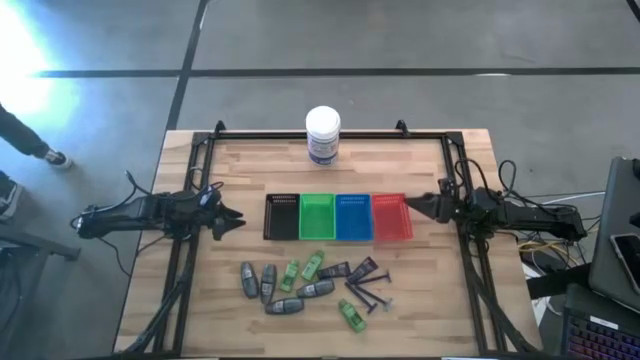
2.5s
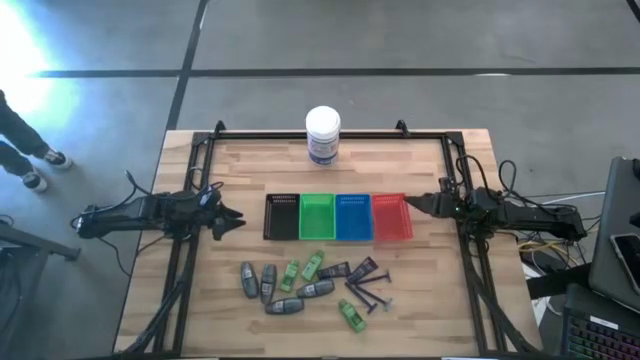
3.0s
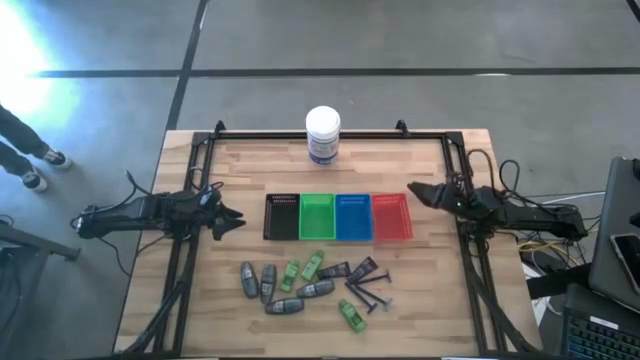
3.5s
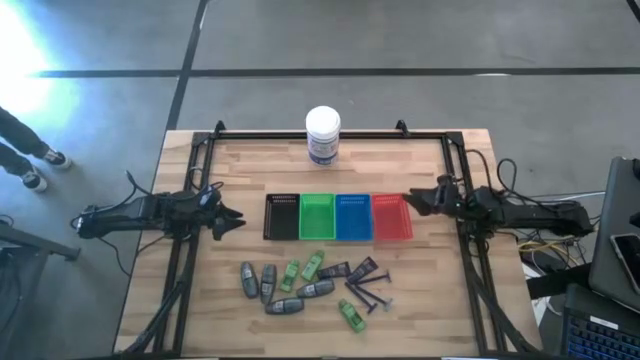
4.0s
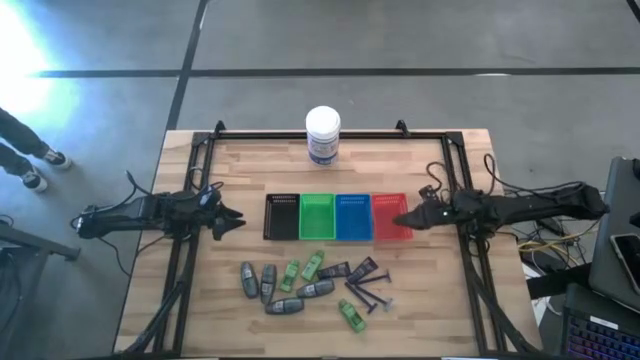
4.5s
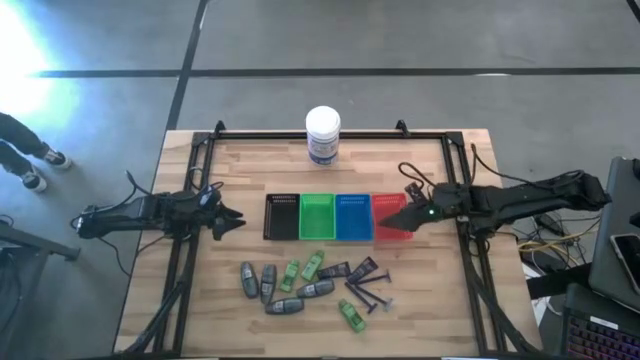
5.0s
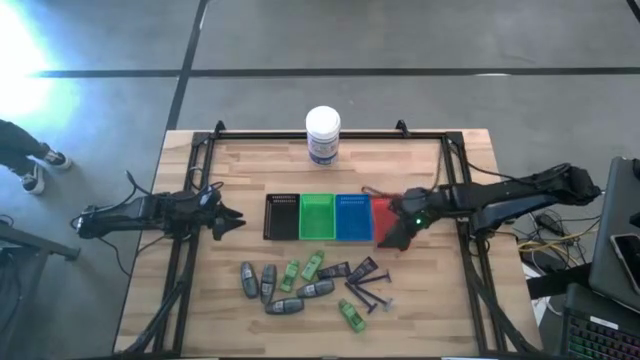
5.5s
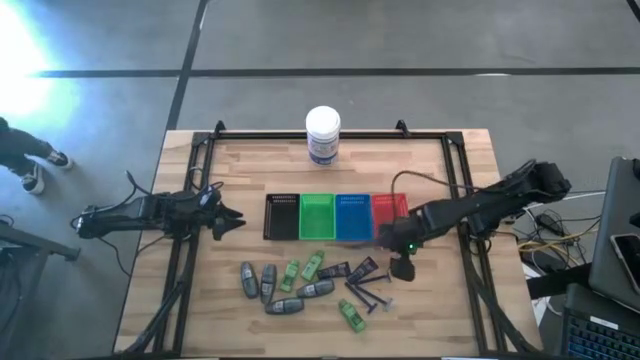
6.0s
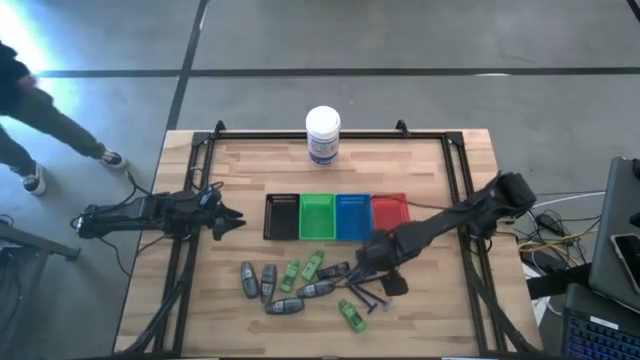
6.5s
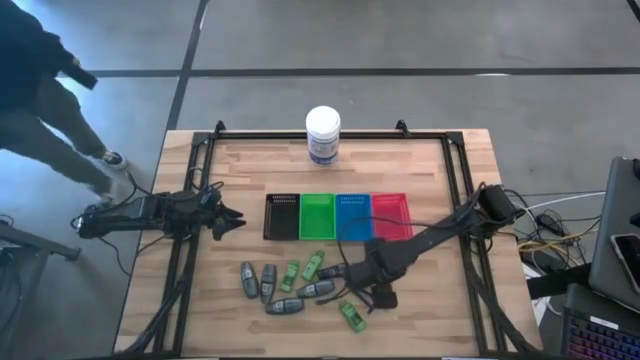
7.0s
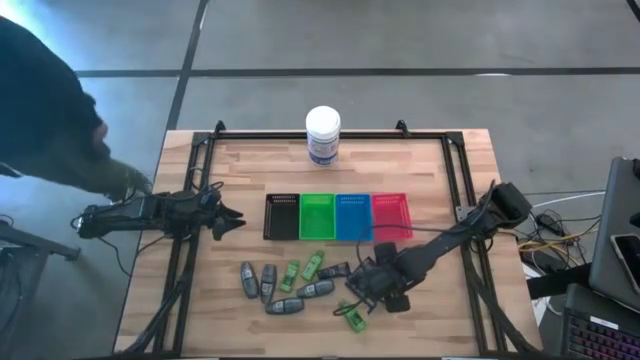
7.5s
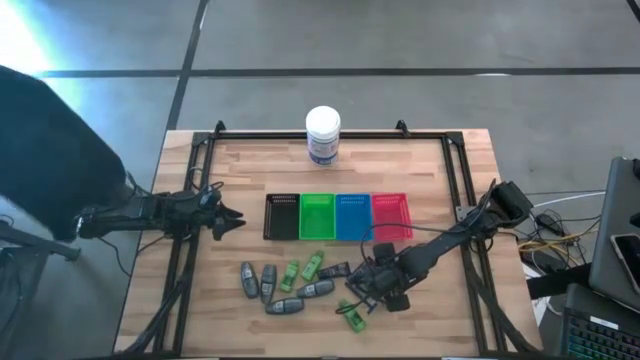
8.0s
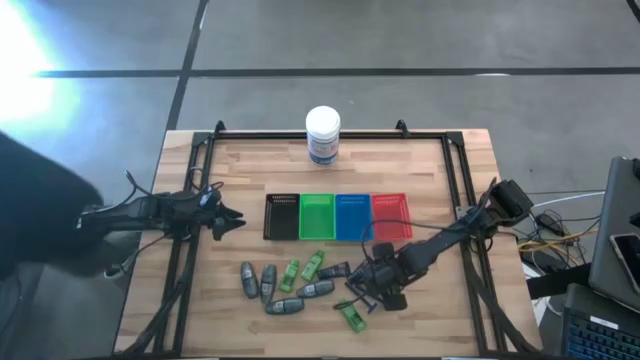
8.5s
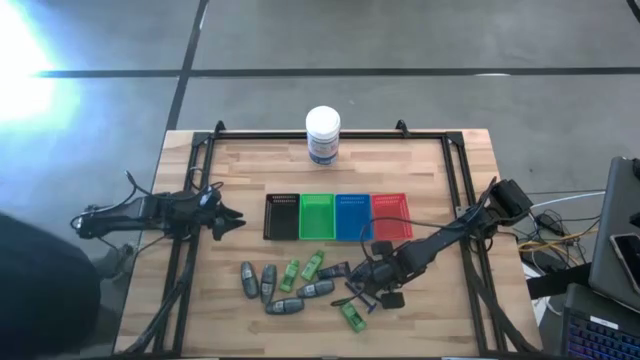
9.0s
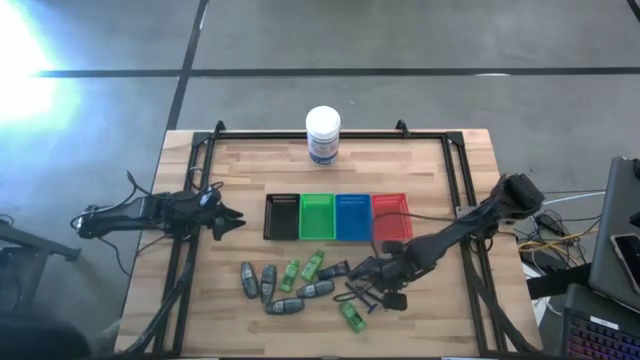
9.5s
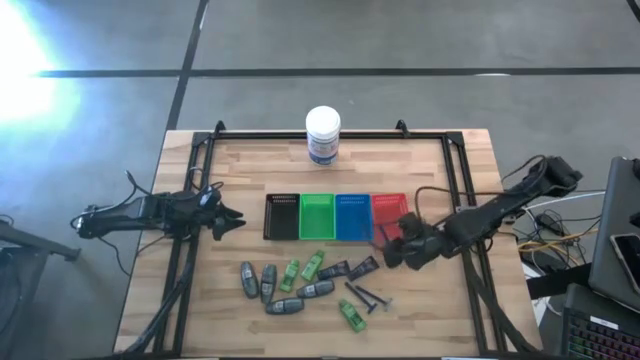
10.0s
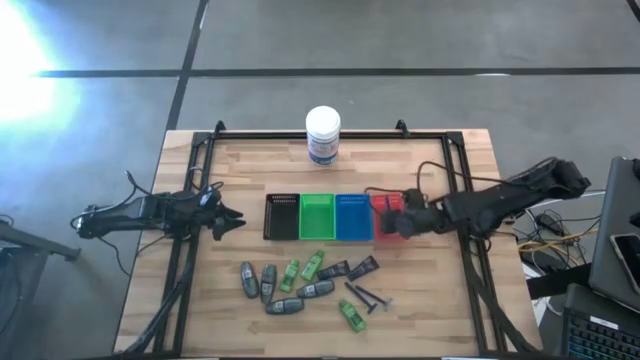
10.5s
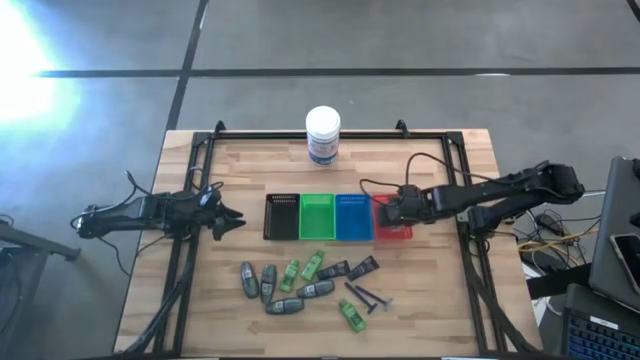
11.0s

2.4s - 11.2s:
Task: Pick & Place Travel size toiletries
Put the blue razor into the red bin

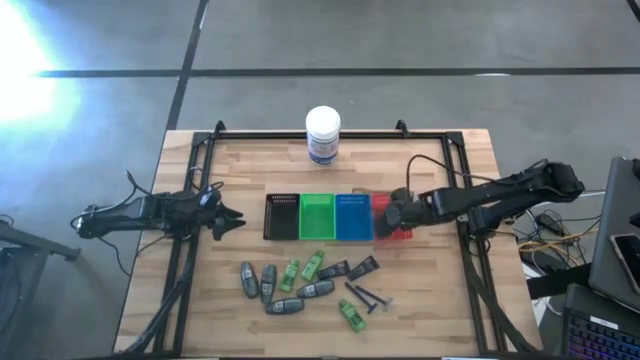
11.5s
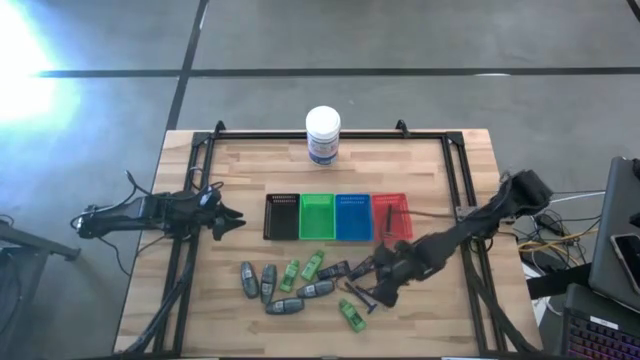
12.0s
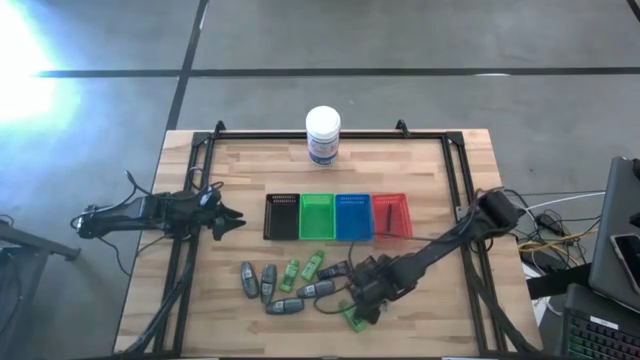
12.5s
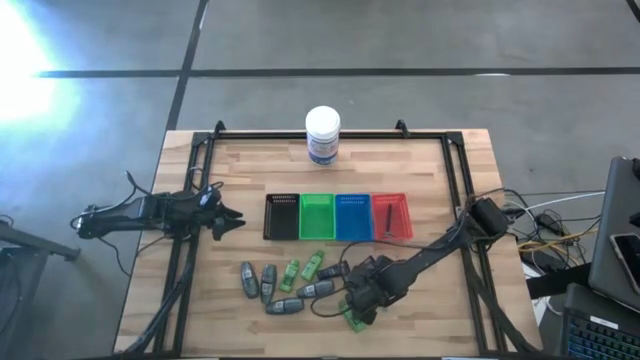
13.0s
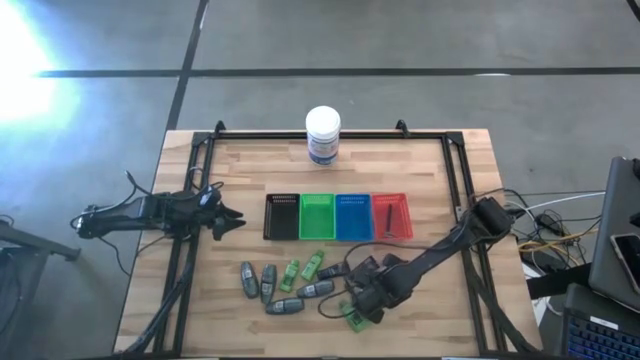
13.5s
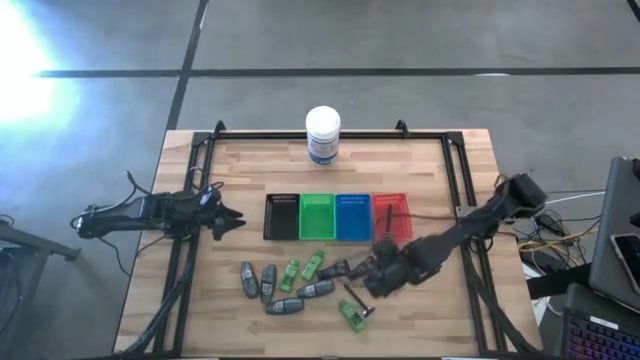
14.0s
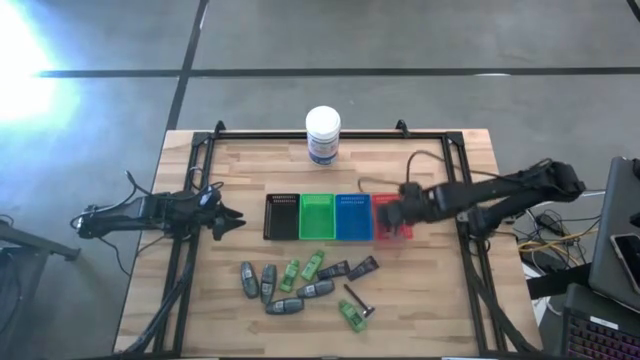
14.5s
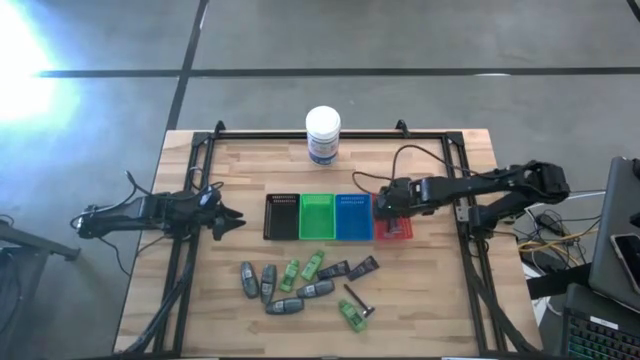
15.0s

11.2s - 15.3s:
Put the blue razor into the red bin

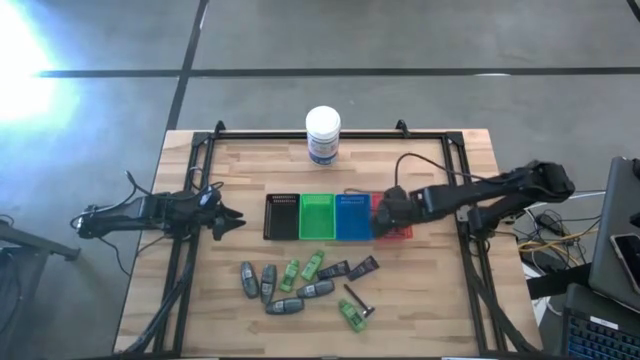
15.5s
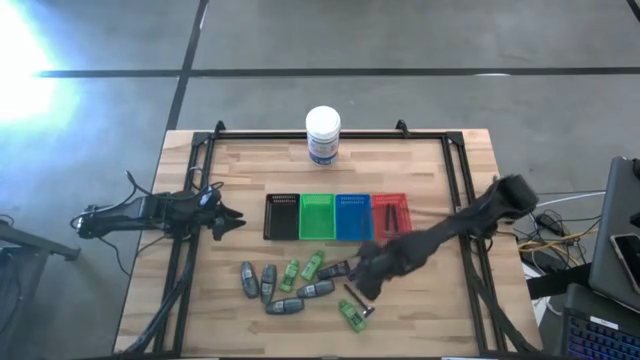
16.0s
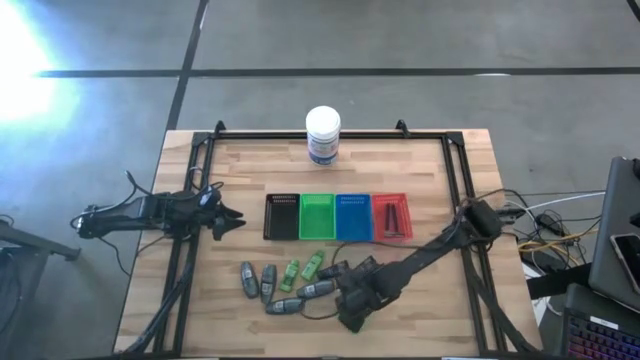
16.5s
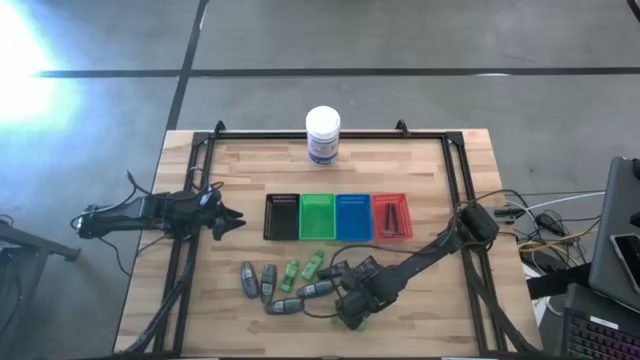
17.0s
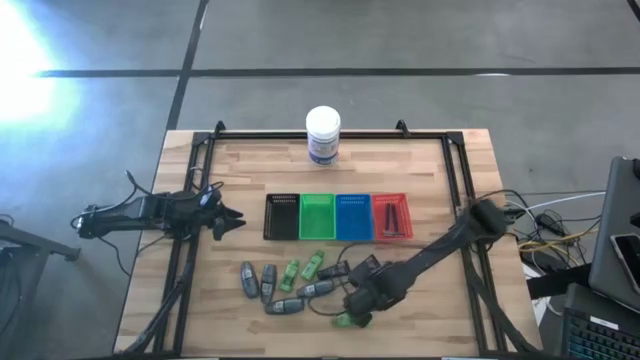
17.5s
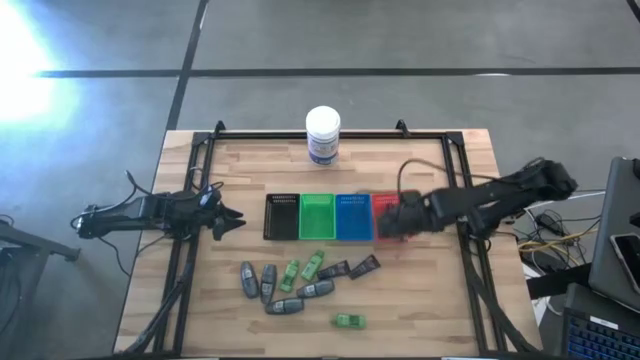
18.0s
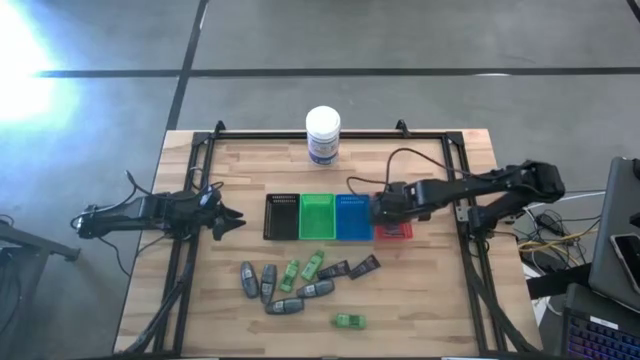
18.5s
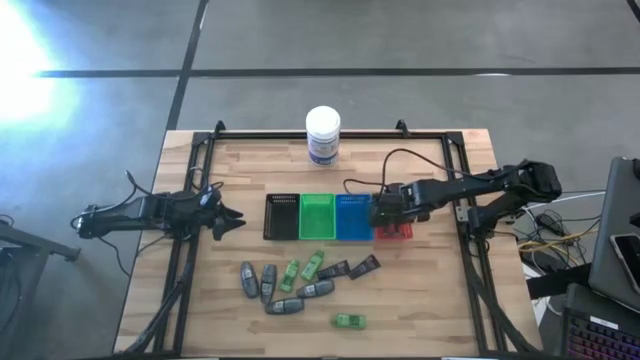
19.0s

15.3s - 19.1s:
Put the blue razor into the red bin

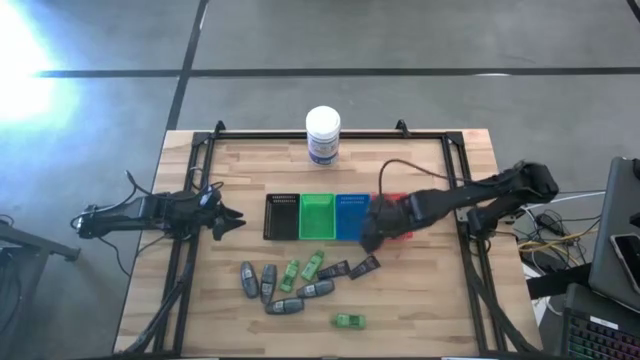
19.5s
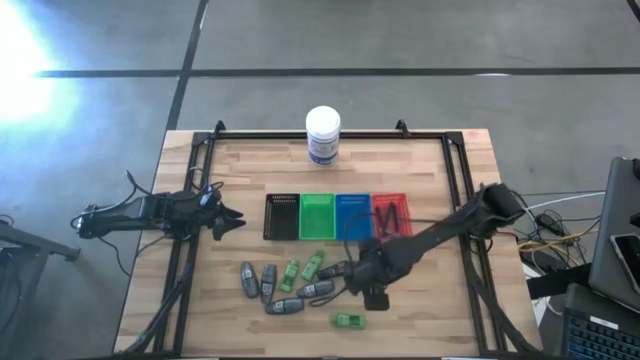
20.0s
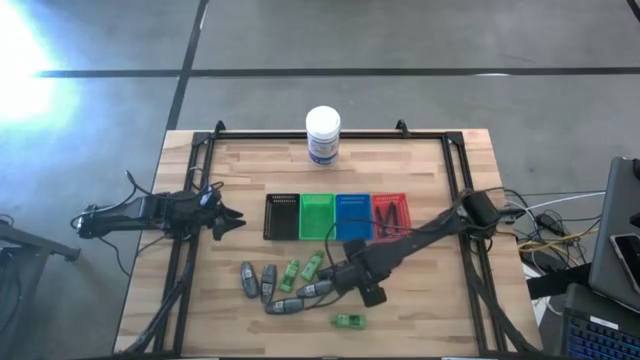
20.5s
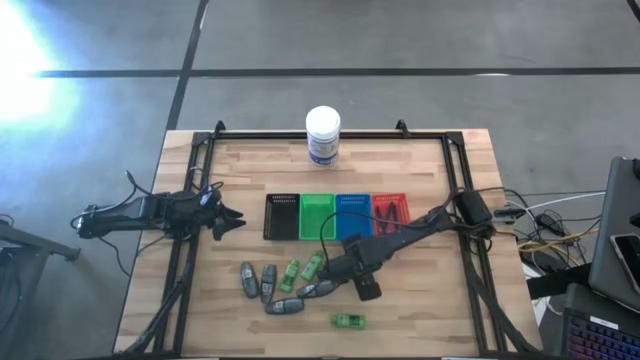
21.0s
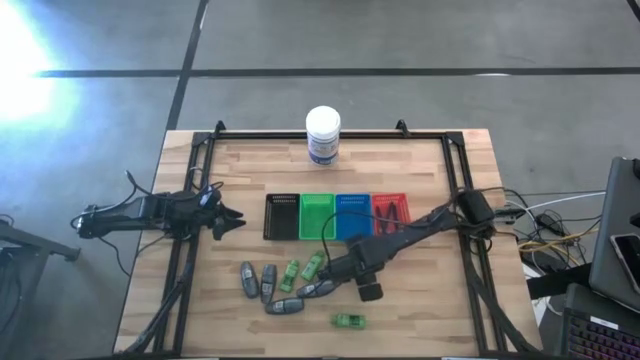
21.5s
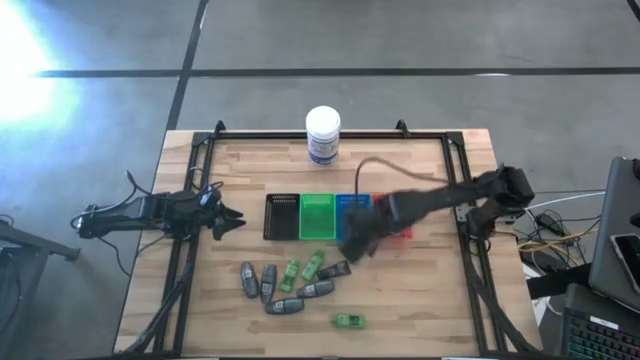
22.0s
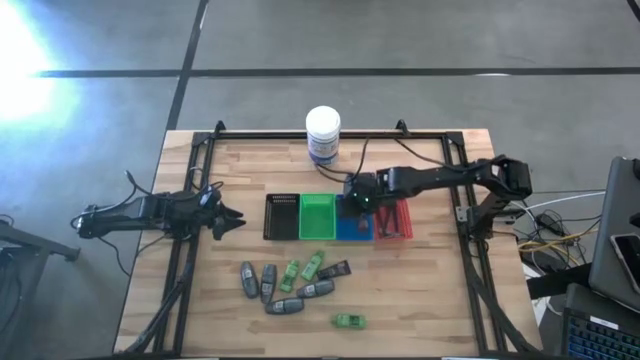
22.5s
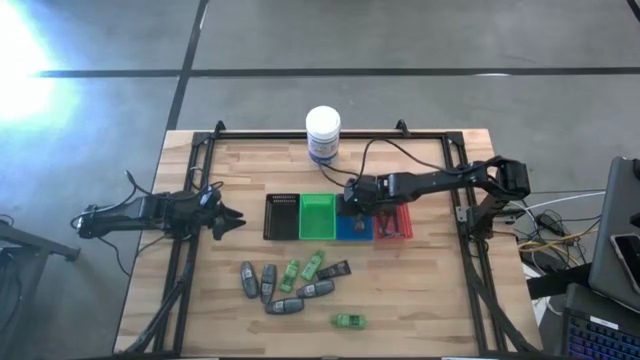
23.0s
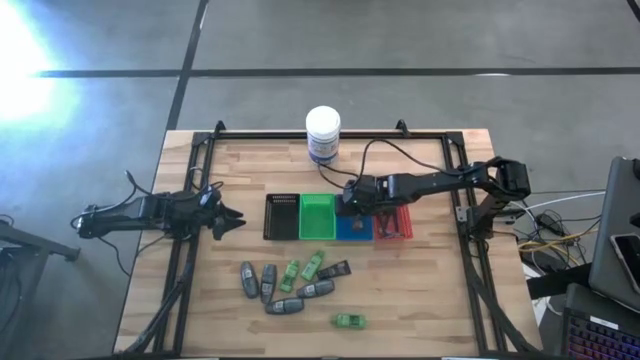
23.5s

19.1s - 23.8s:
Put the blue shave cream into the blue bin

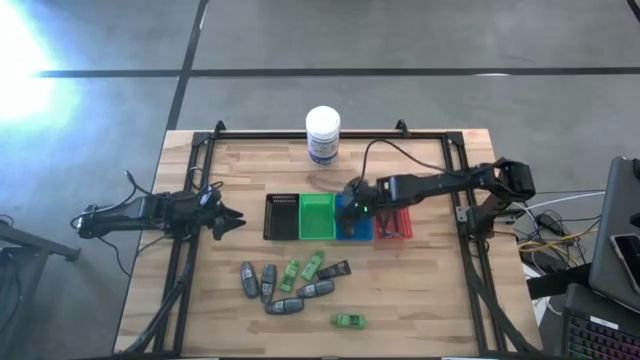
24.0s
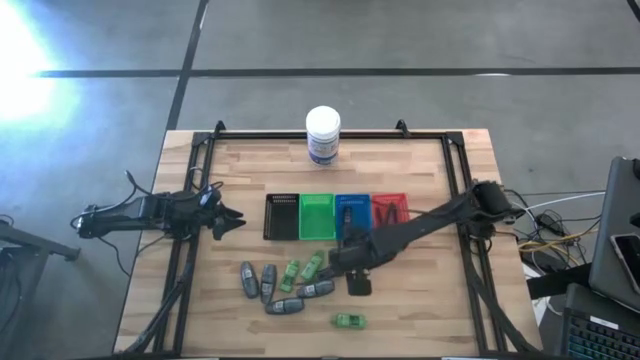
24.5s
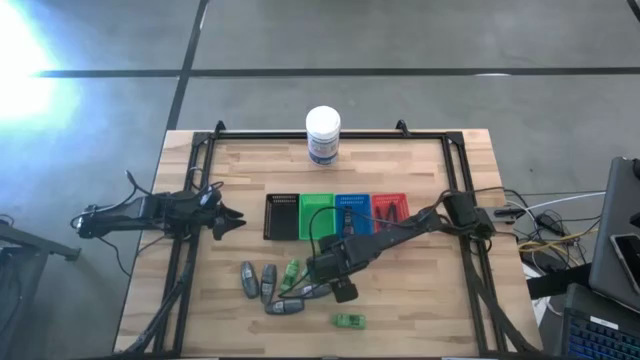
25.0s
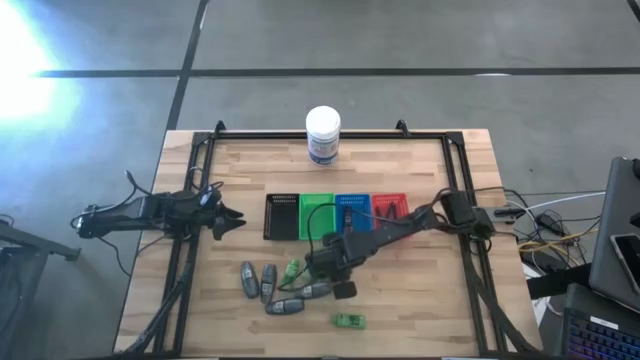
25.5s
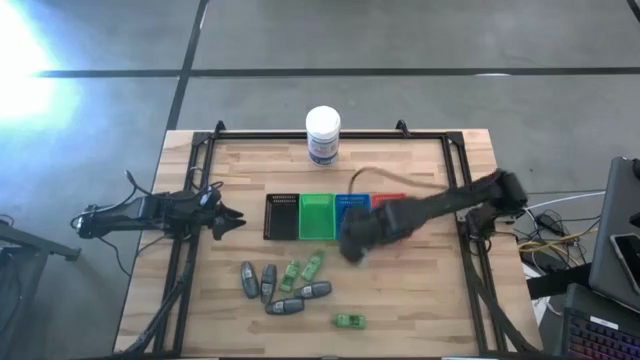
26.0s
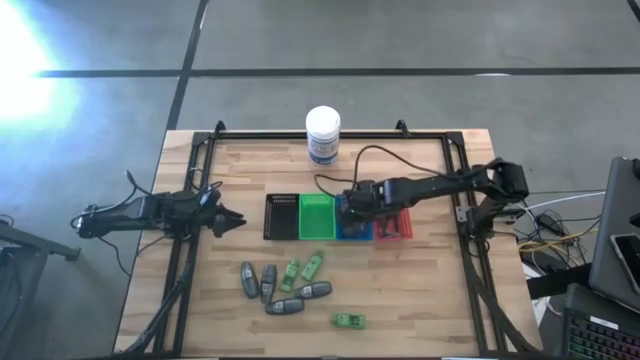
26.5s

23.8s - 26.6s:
Put the blue shave cream into the blue bin
